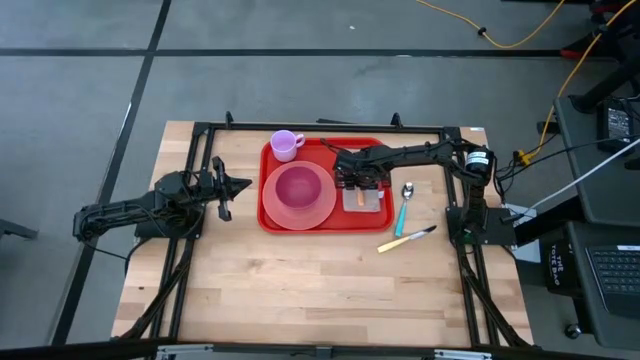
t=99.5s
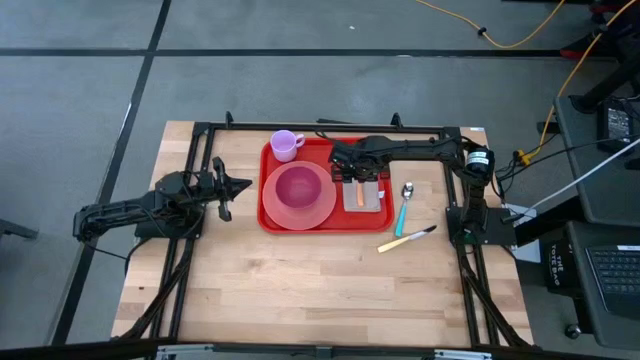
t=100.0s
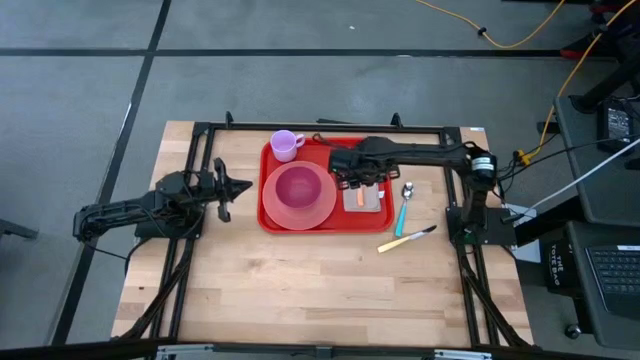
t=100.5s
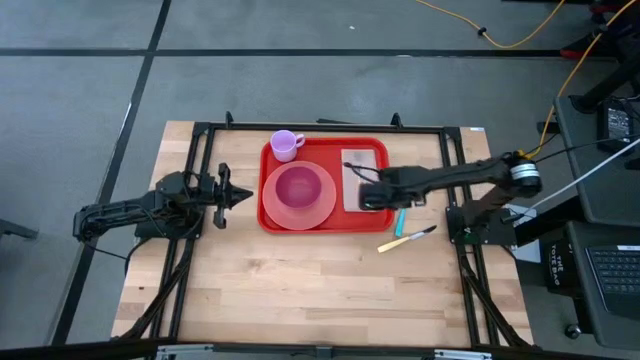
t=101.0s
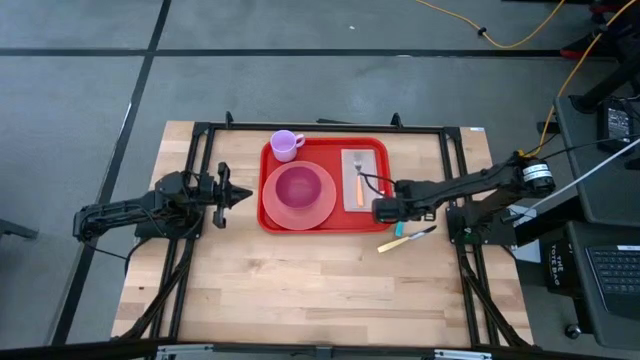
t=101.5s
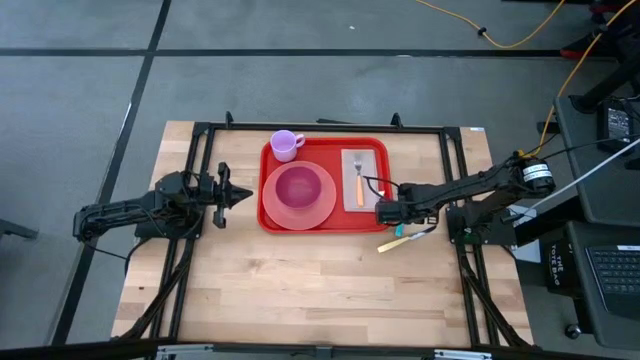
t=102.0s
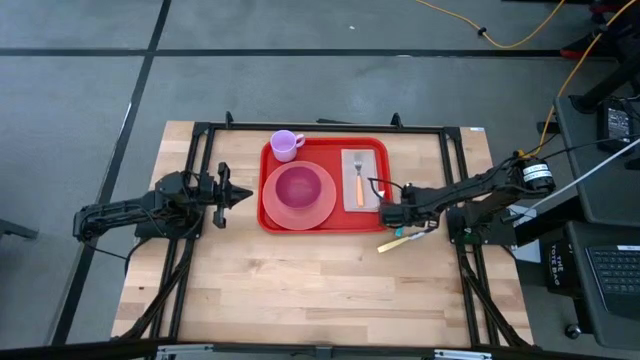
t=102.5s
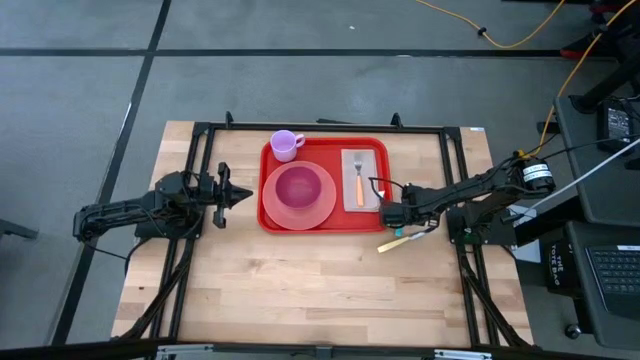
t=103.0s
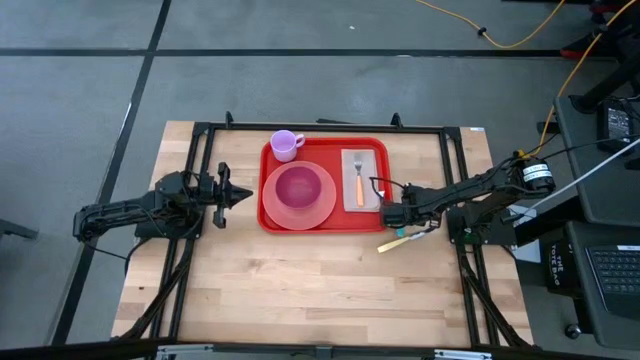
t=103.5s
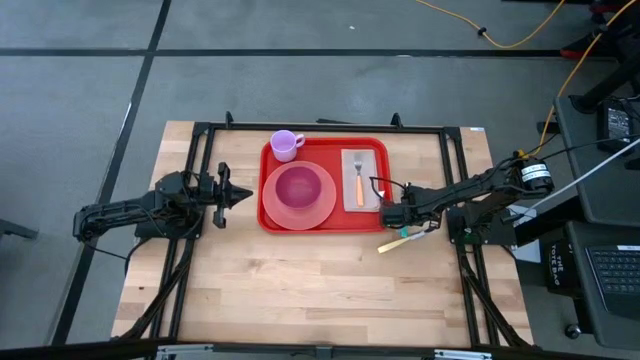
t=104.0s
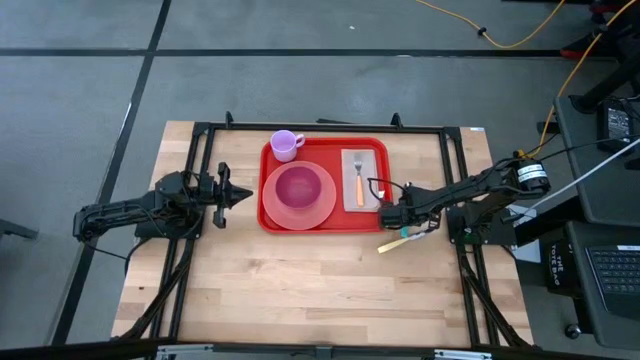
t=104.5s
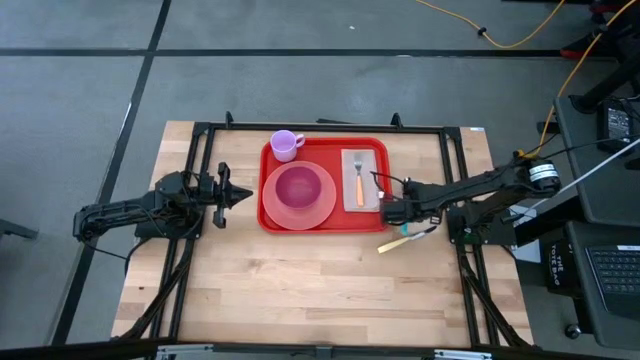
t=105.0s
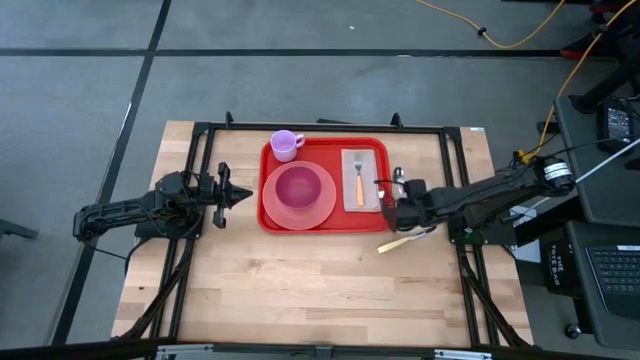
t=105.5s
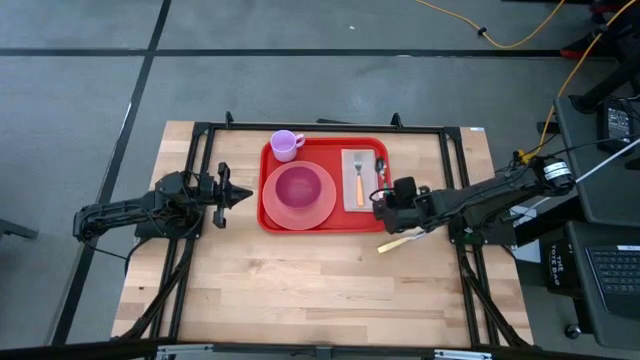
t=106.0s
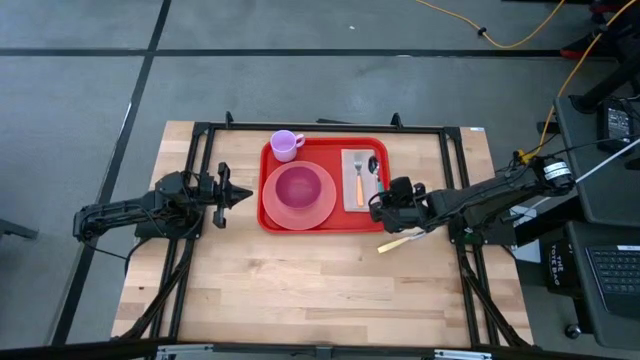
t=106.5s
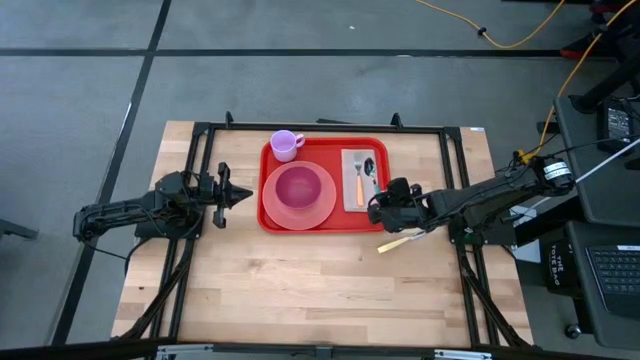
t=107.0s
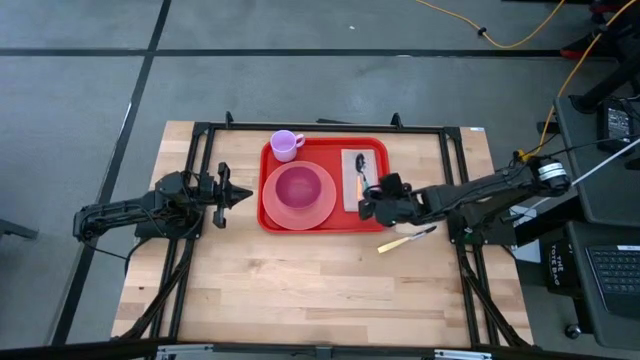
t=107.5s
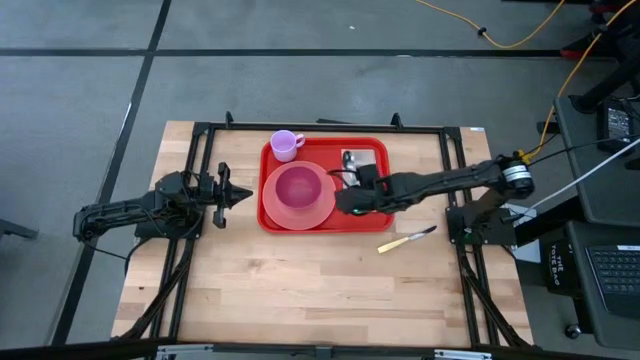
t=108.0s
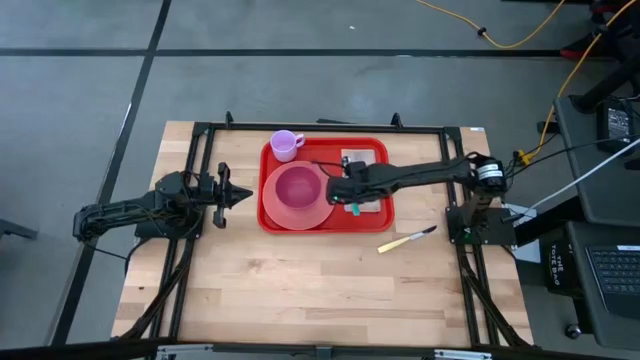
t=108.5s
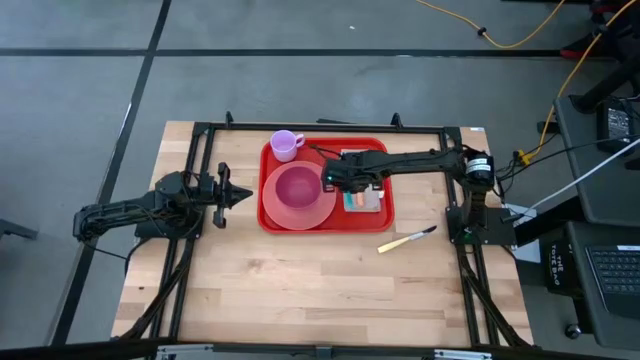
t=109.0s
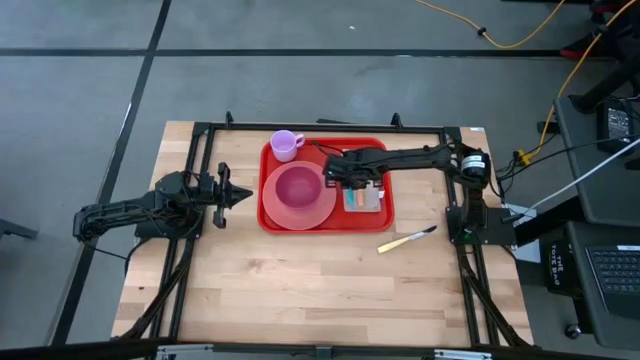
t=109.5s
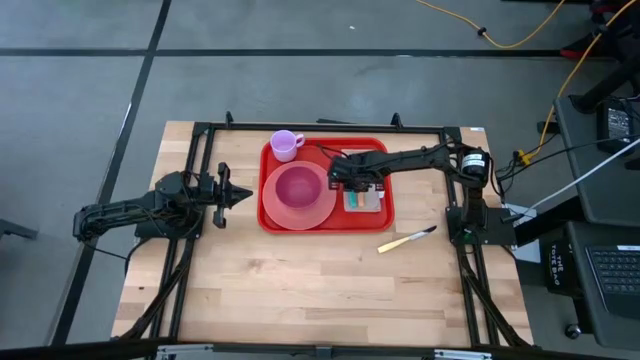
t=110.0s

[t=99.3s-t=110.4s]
Task: Set up tray
Put the blue spoon on top of the brown napkin on the right side of the pink plate

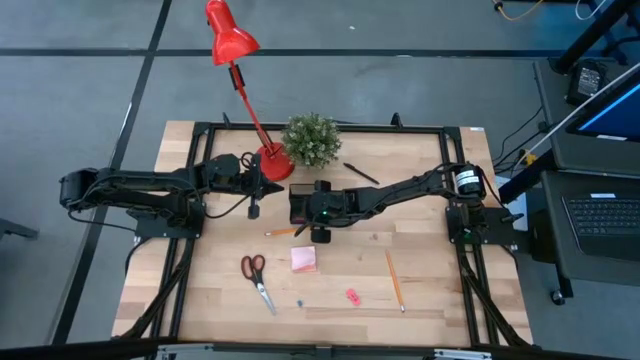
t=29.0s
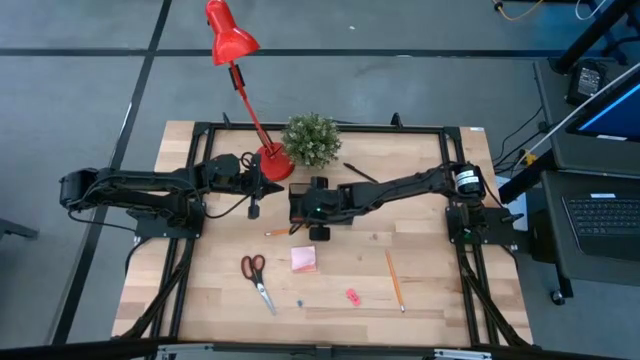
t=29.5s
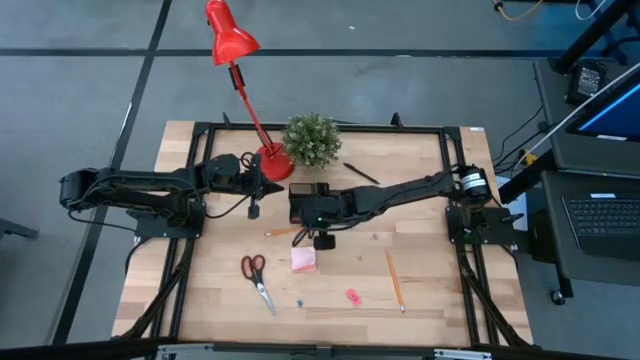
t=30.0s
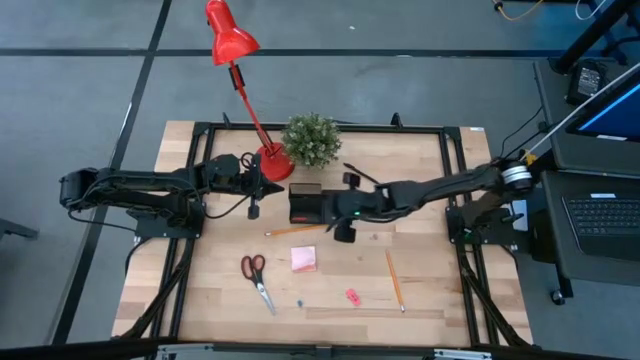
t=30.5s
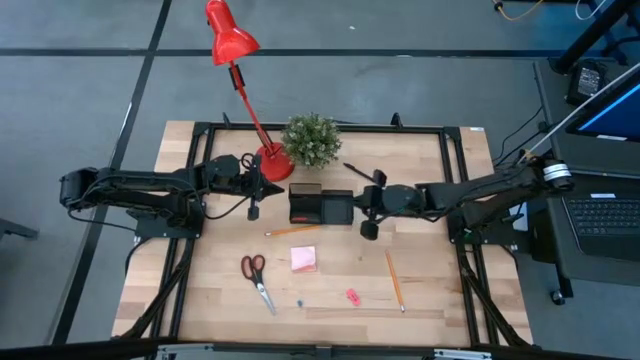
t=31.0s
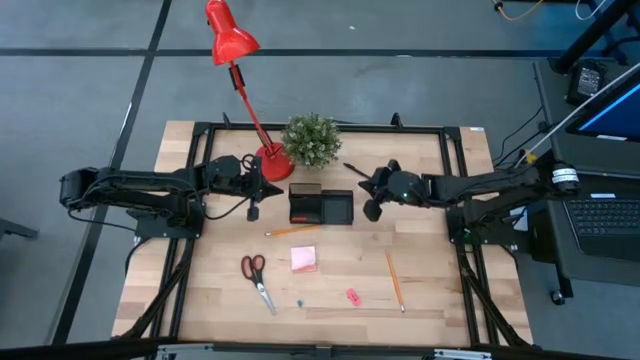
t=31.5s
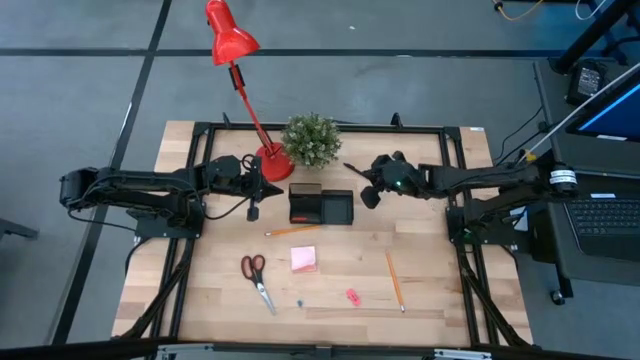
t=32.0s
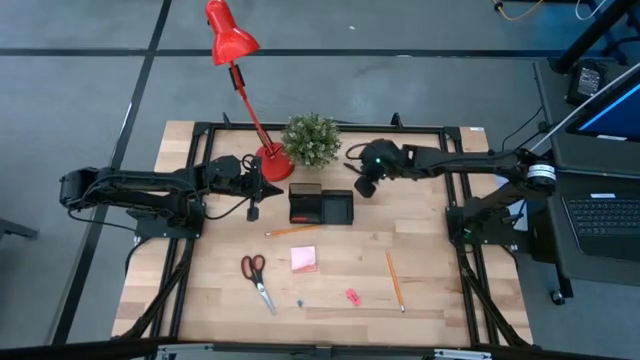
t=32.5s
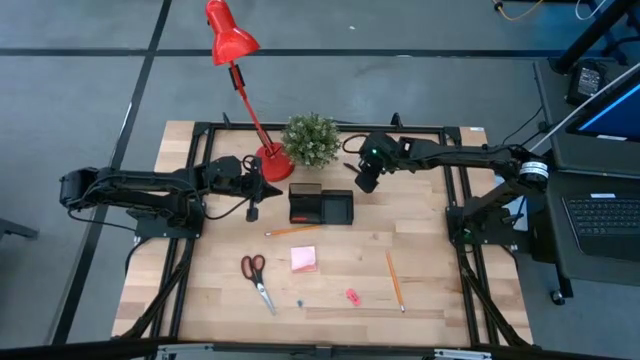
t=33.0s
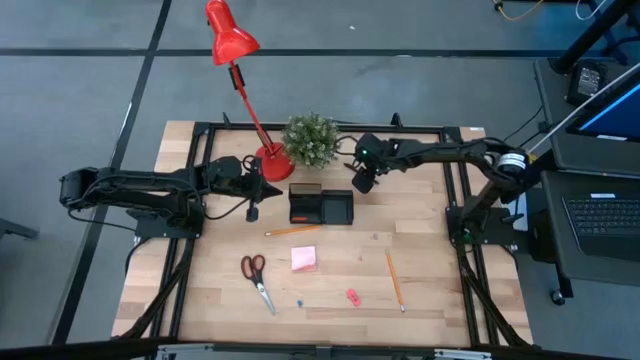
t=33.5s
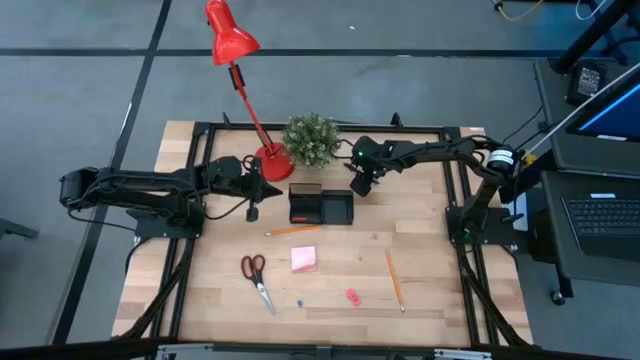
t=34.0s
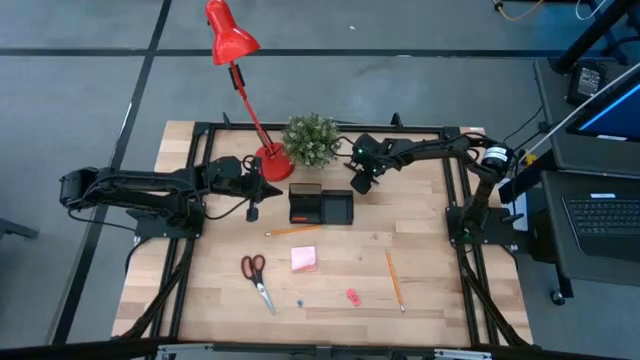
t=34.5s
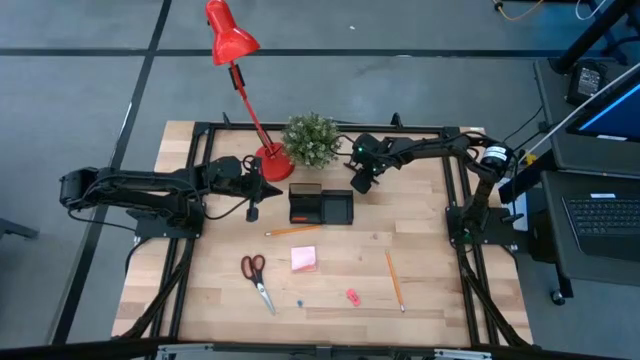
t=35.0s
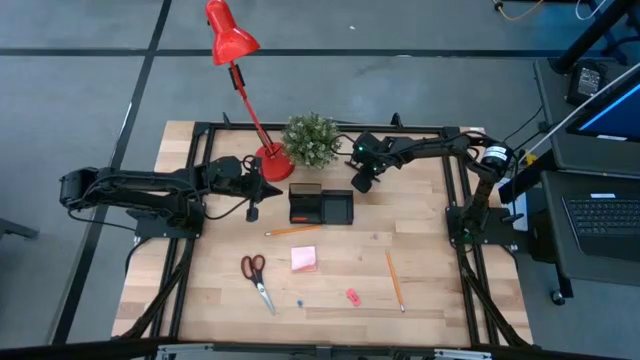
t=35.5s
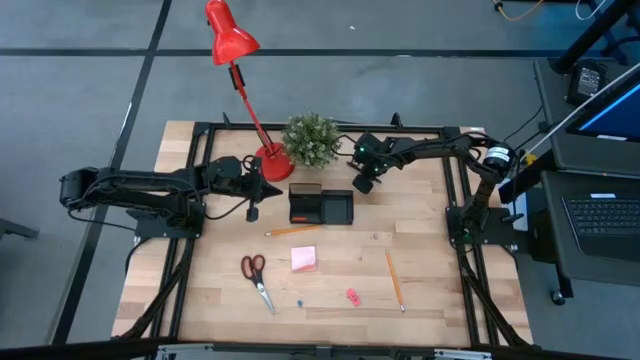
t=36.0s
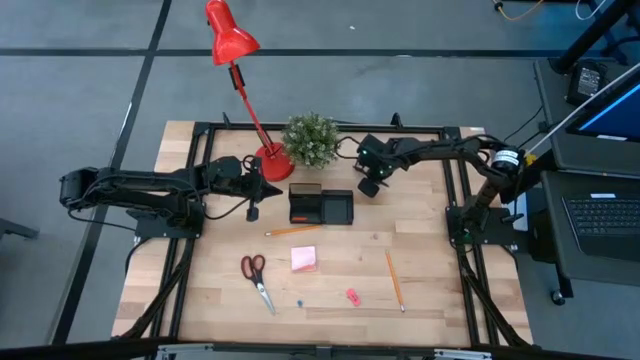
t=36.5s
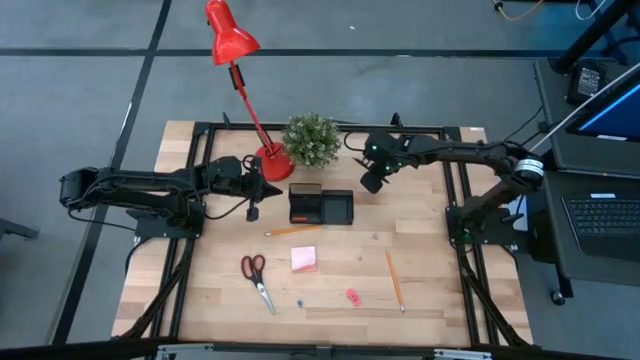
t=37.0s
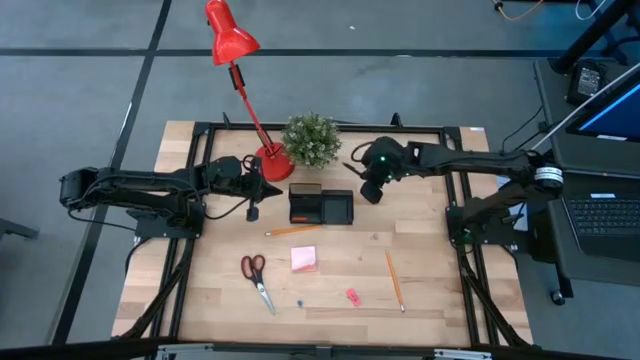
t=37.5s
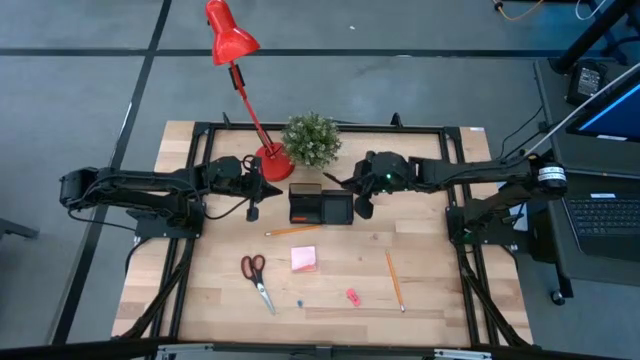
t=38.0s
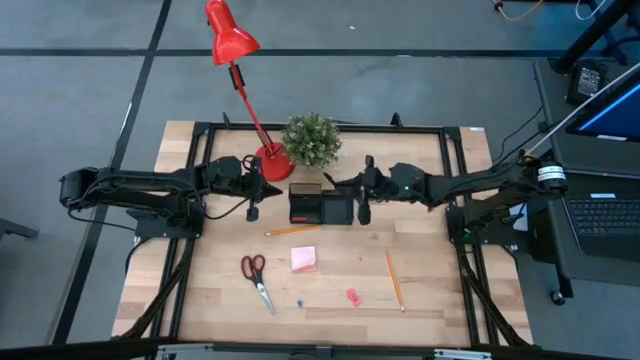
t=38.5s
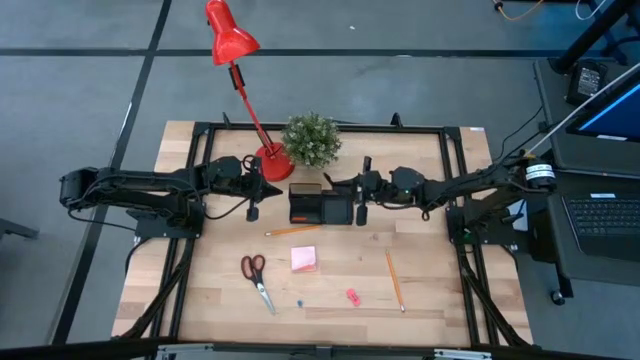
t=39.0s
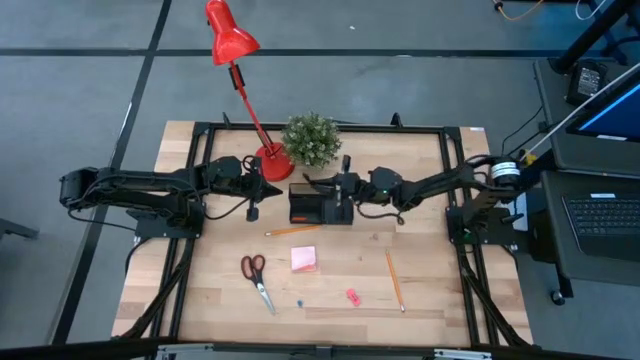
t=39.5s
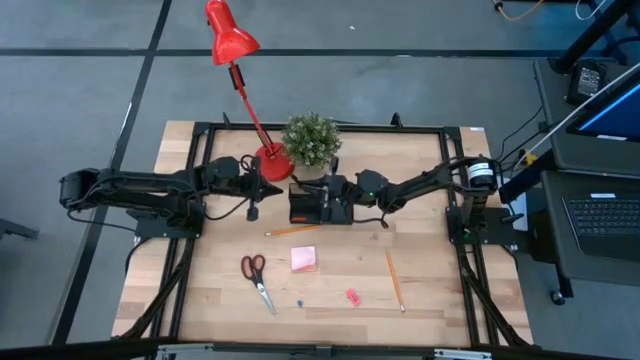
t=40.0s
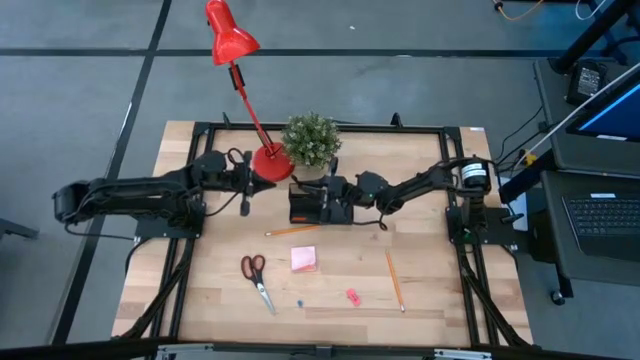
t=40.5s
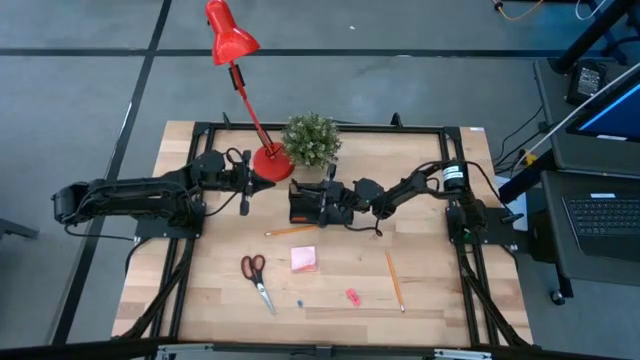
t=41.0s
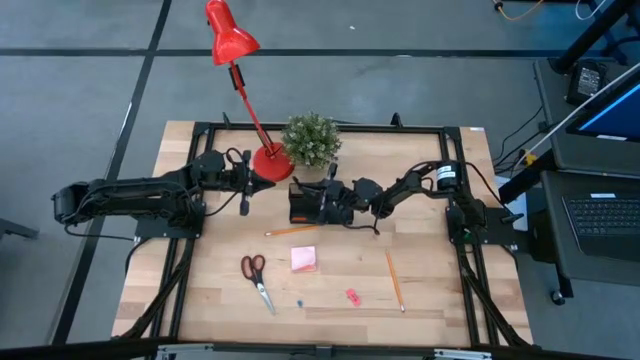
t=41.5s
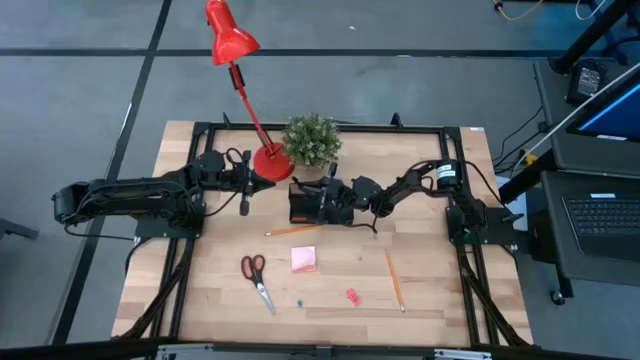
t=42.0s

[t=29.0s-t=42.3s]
Task: Pick and place office supplies into organizer
Put the black pen into the black desk organizer
